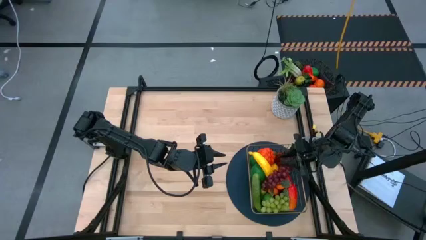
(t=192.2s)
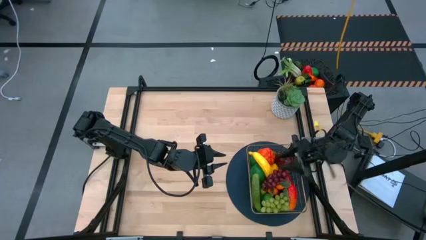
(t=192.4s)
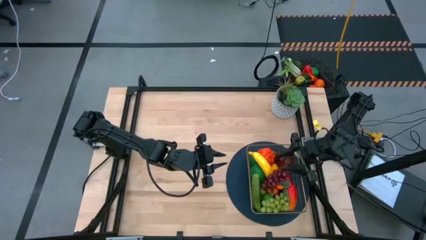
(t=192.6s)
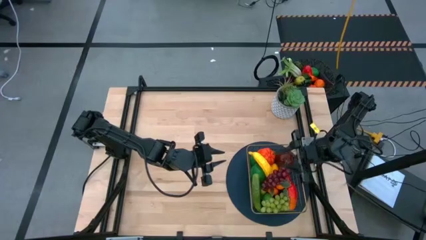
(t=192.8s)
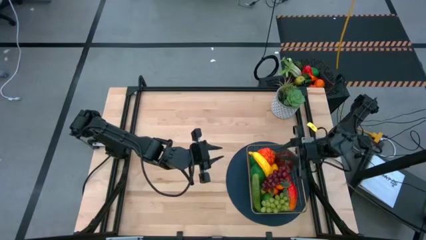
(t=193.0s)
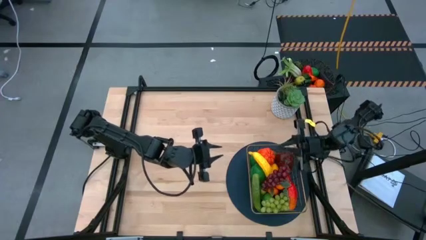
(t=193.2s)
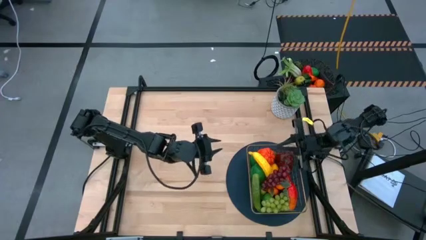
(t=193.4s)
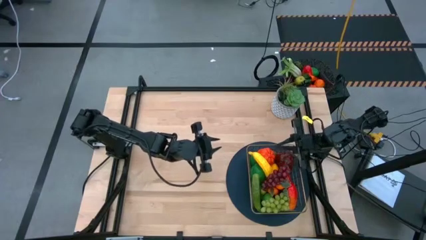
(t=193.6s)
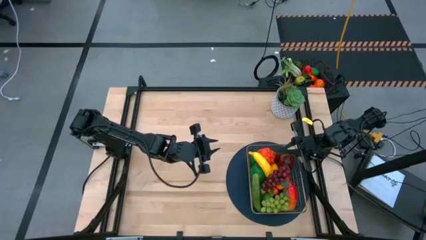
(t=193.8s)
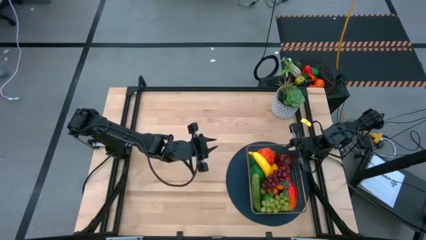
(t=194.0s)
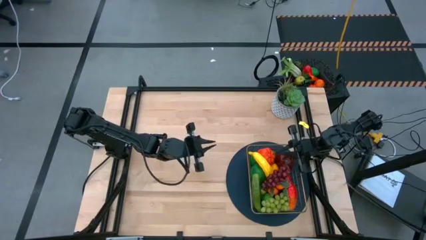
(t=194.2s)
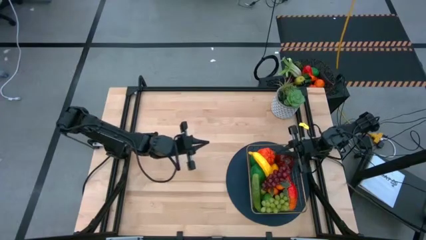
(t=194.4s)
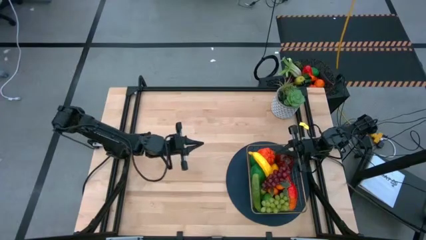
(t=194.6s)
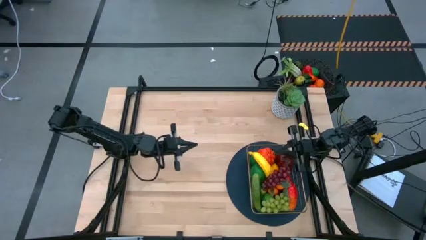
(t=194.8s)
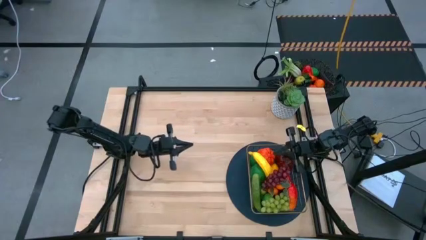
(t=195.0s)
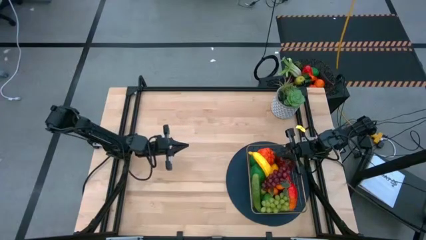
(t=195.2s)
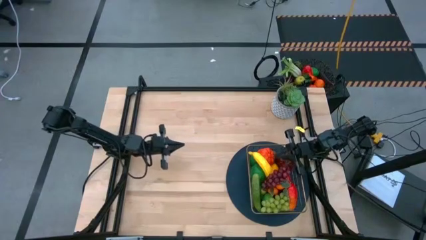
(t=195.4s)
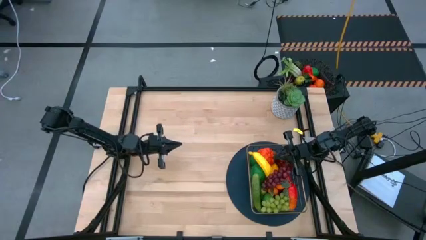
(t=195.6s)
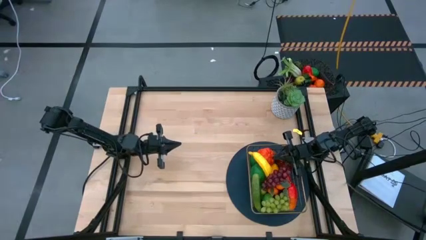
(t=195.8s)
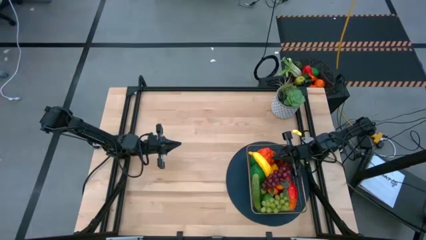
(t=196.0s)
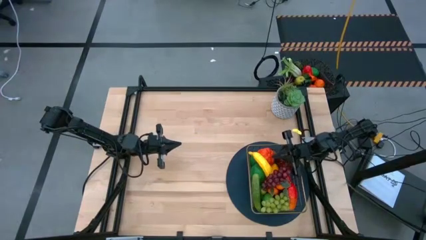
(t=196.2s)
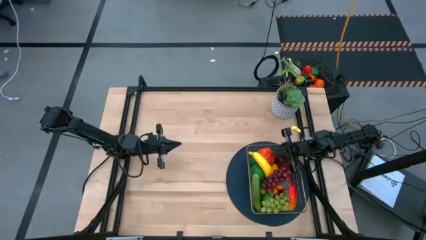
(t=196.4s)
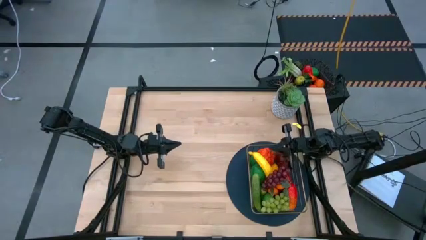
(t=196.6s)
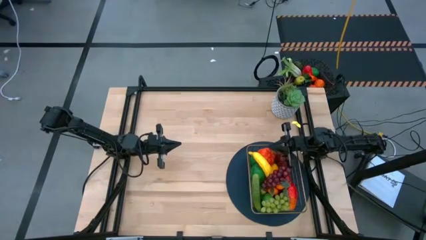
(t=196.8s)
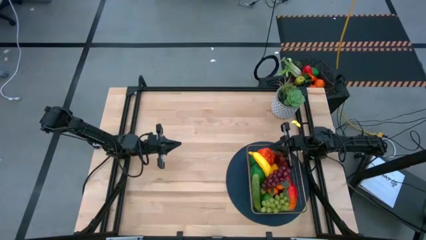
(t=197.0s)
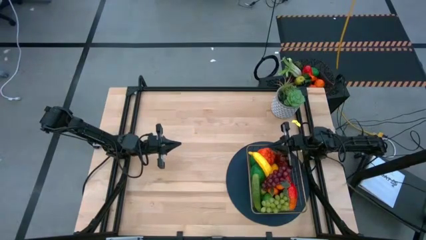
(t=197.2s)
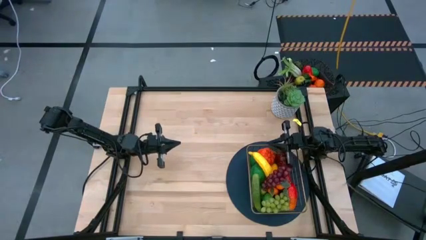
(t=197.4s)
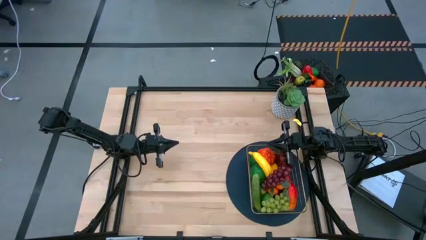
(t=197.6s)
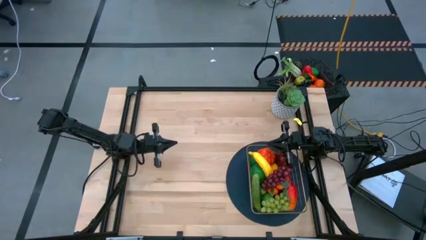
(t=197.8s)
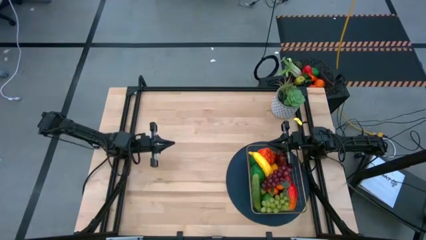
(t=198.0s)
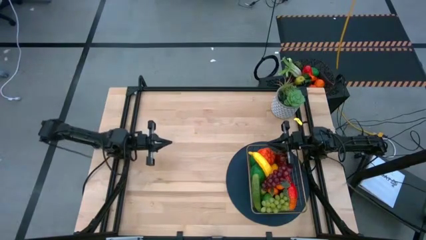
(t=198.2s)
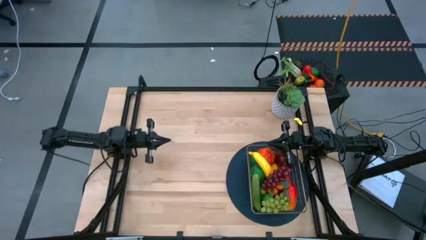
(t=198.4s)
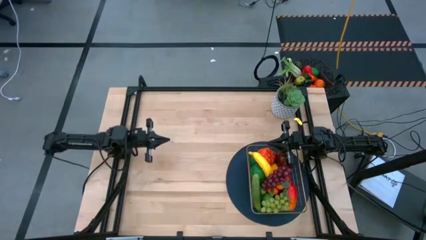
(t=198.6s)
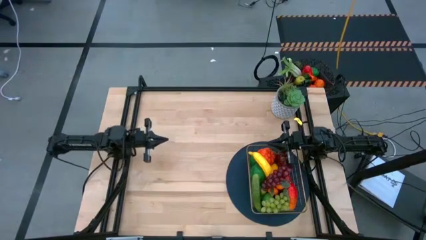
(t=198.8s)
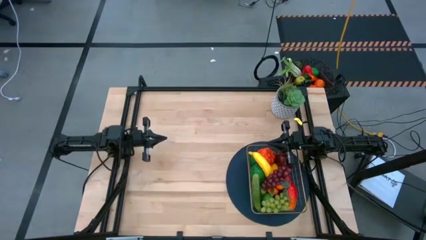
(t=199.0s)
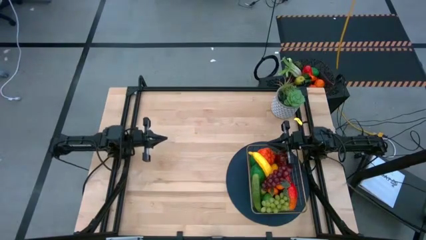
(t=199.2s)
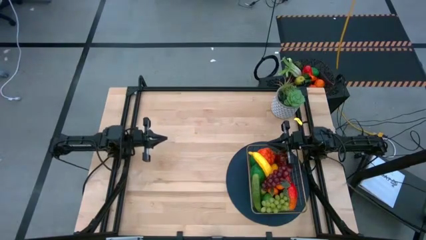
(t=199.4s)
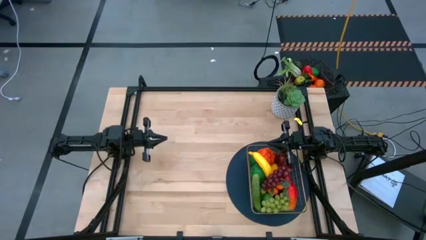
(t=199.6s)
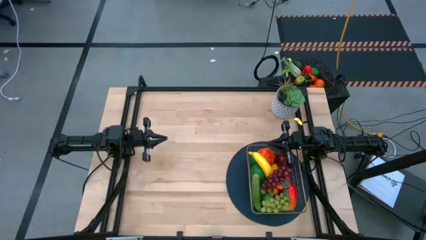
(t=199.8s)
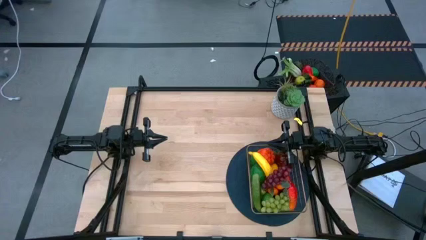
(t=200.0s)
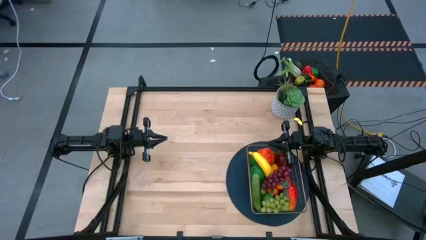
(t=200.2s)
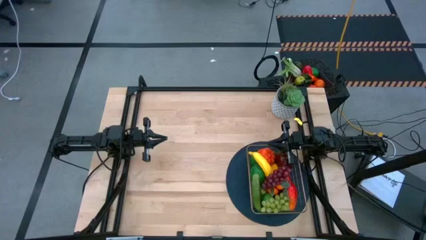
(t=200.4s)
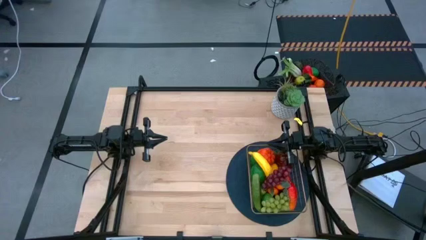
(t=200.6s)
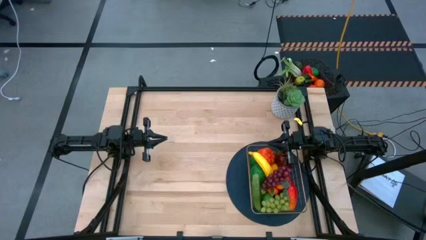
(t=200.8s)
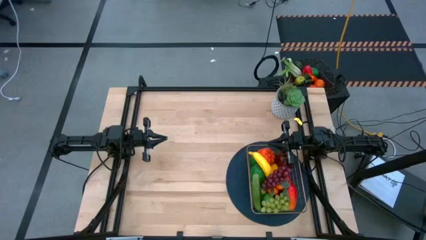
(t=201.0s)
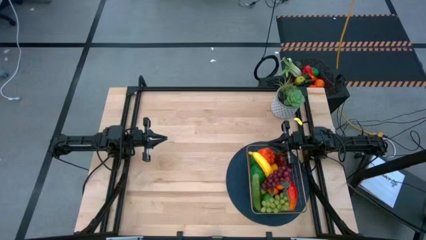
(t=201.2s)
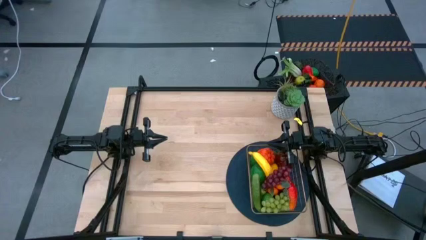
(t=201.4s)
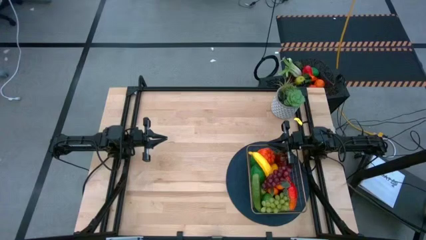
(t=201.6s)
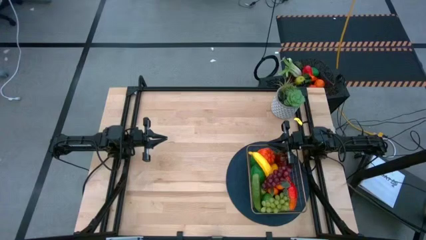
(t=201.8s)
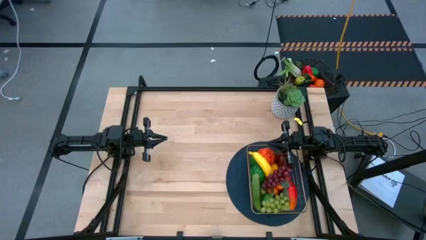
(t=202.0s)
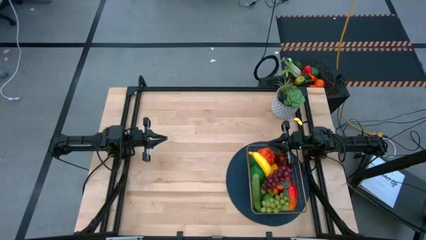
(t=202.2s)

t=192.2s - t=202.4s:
Task: Build produce basket
Return to Home Position

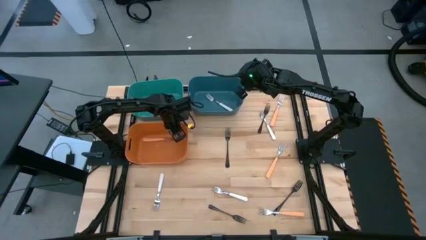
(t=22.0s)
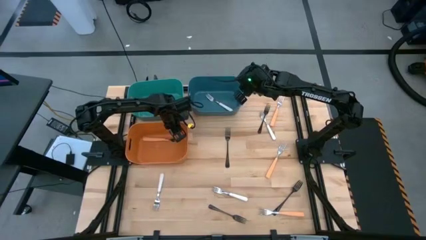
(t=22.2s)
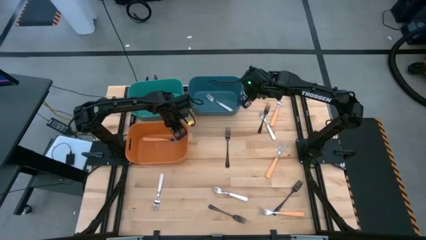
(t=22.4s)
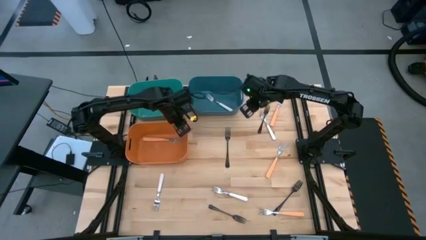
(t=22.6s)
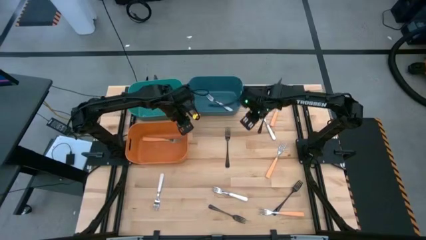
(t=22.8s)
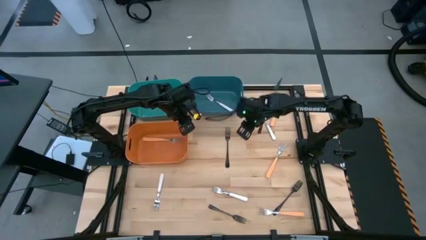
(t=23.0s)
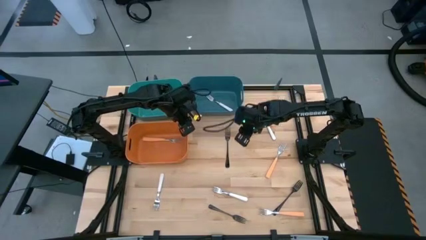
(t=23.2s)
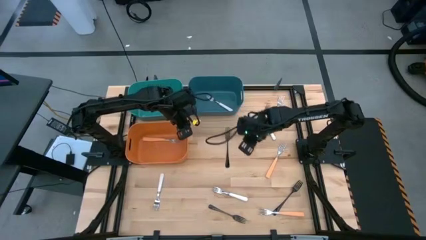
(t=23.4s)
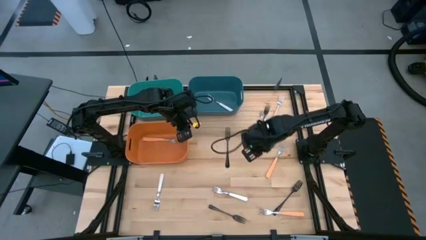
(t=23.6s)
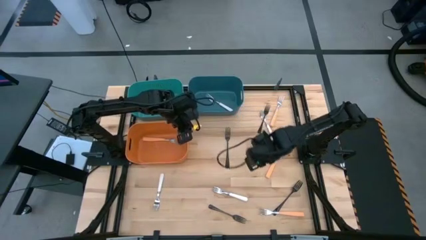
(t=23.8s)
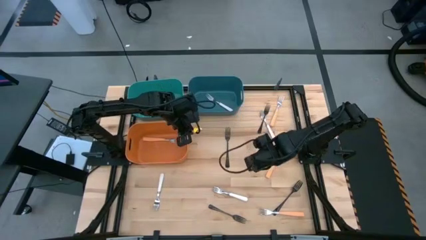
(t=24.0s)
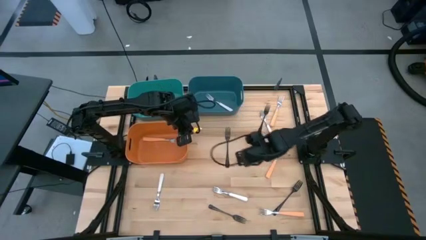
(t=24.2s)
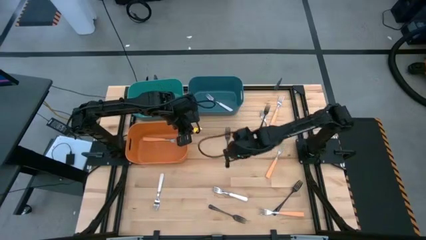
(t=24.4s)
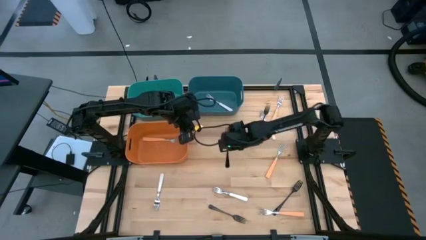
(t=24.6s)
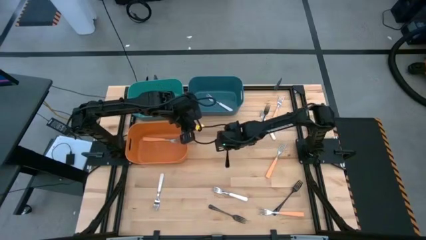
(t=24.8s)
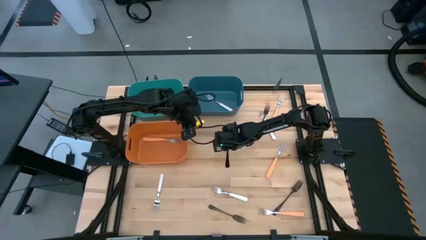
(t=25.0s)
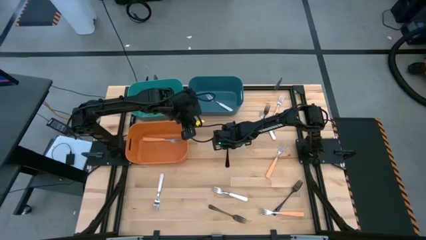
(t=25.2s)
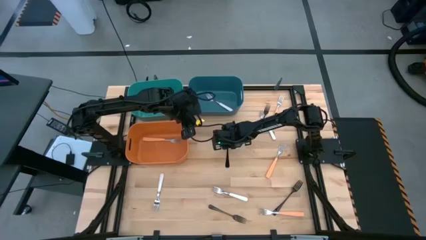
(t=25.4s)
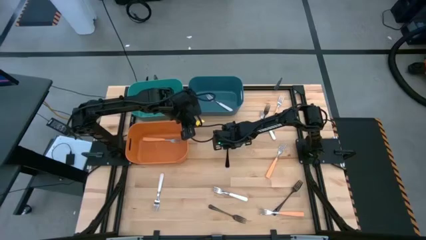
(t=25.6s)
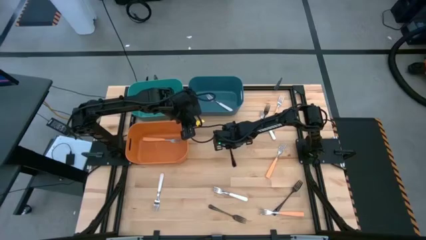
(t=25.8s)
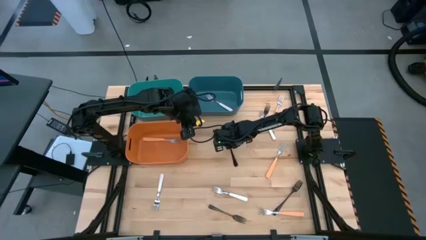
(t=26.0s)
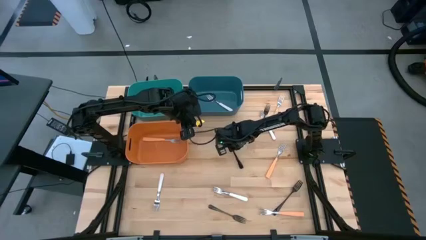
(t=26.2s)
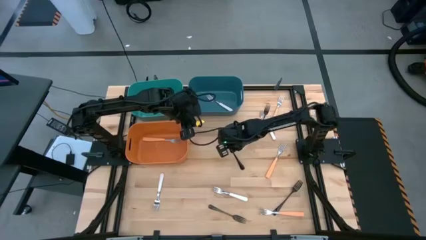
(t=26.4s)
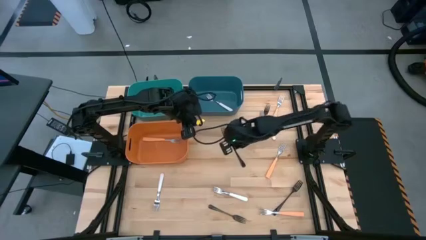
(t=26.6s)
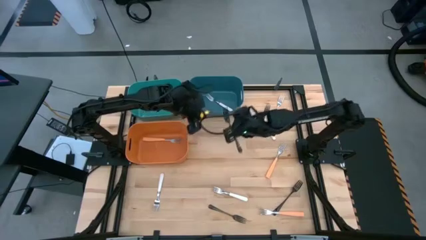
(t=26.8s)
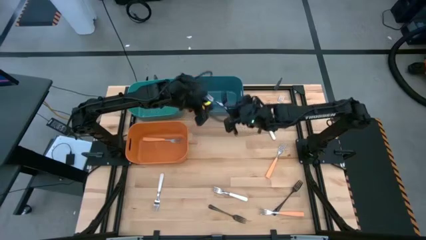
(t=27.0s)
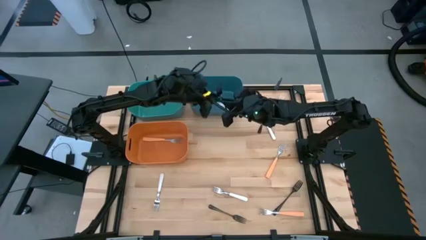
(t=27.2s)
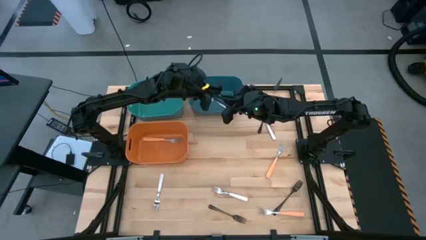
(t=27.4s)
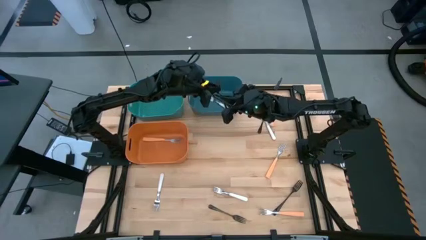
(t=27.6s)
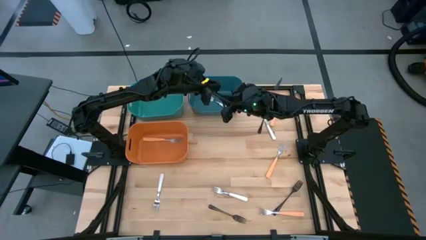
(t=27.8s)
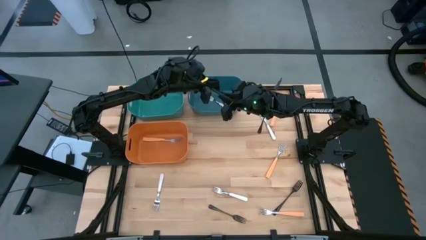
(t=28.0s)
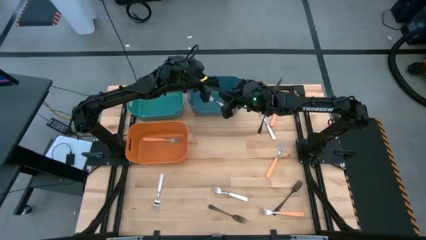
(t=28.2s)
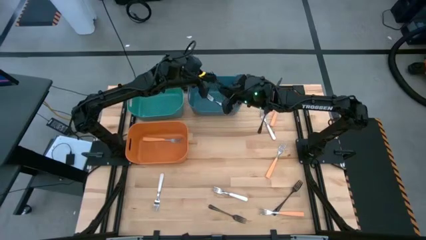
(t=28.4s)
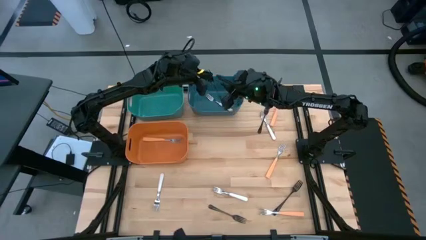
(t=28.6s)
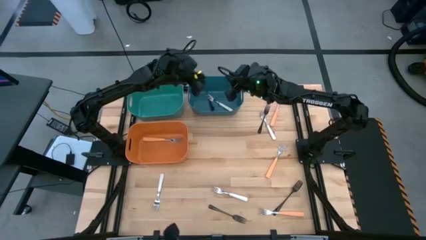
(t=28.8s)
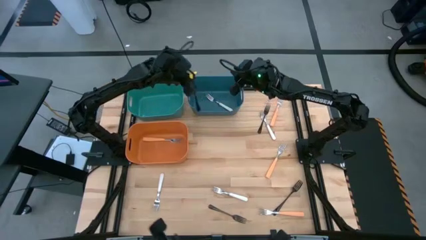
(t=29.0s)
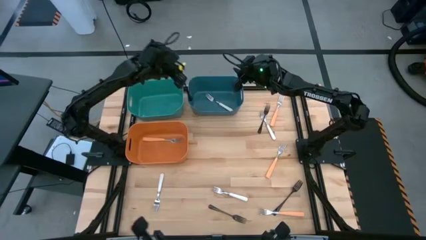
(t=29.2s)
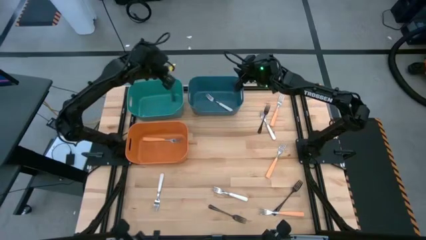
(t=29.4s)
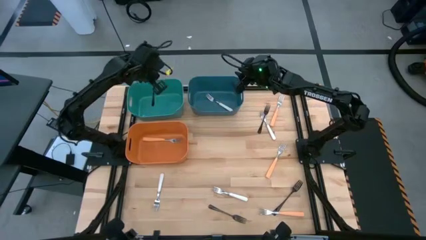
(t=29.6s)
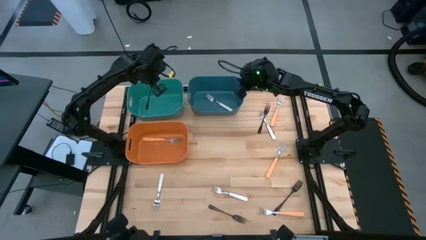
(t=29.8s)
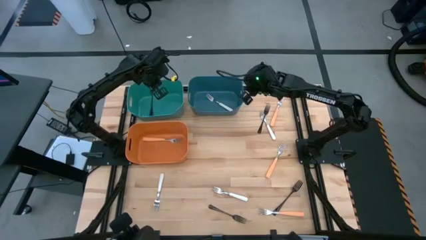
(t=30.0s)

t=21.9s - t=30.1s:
Task: Sort silverware by color (type)
Put the black fork into the green bin
